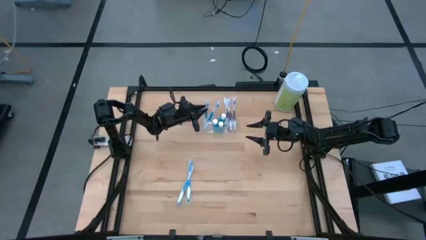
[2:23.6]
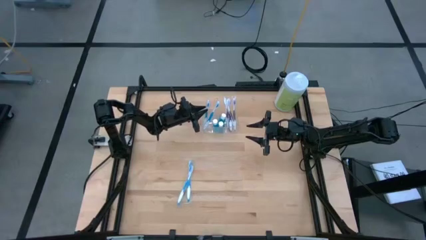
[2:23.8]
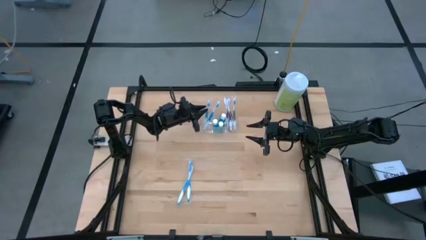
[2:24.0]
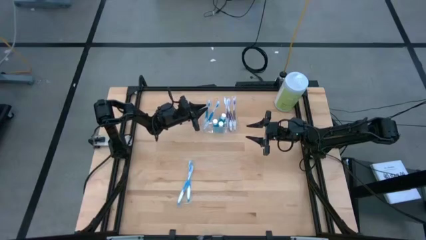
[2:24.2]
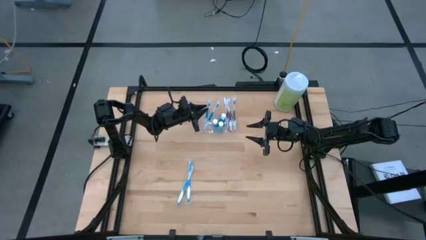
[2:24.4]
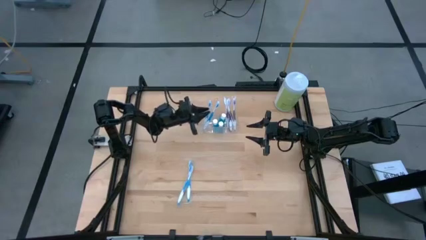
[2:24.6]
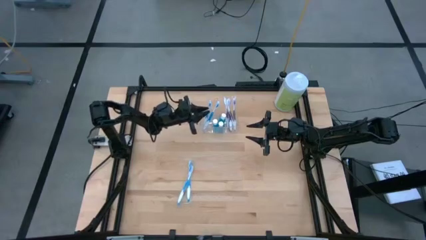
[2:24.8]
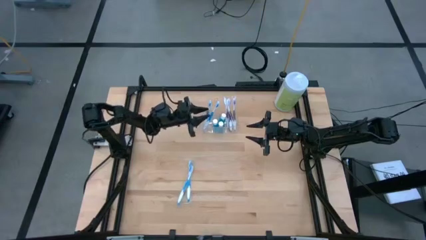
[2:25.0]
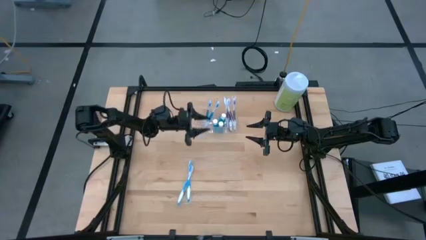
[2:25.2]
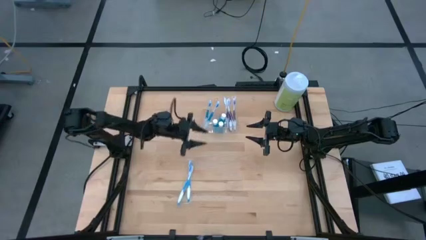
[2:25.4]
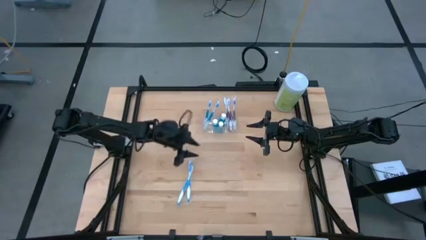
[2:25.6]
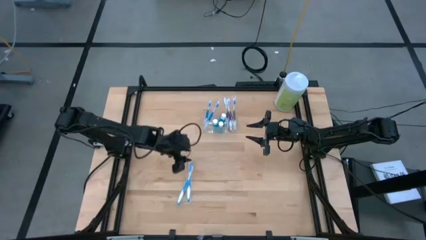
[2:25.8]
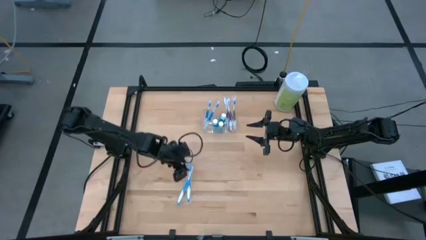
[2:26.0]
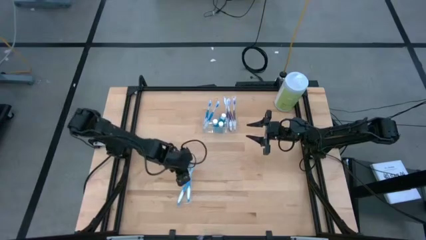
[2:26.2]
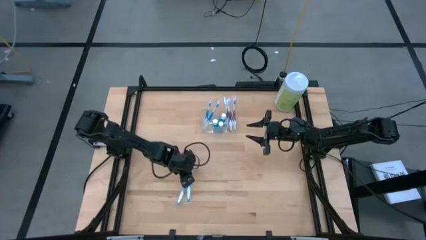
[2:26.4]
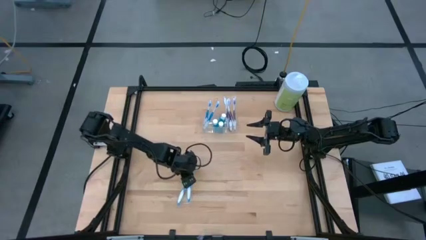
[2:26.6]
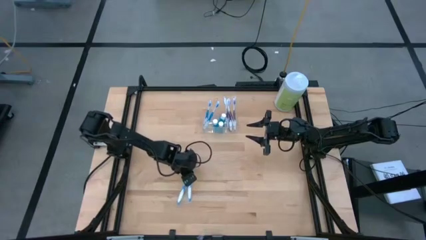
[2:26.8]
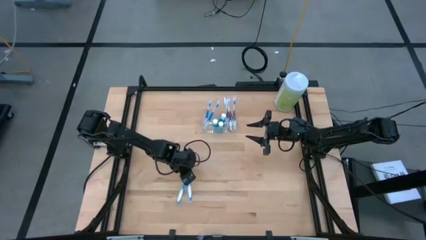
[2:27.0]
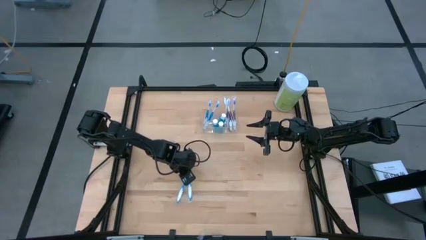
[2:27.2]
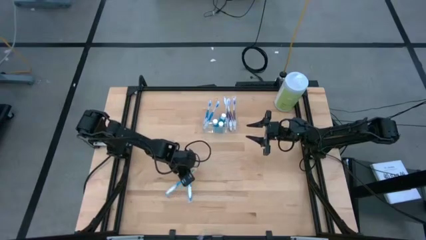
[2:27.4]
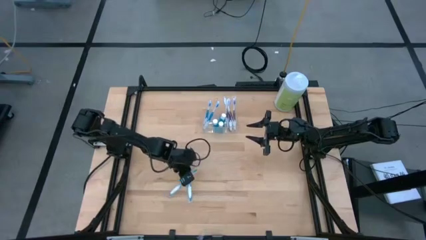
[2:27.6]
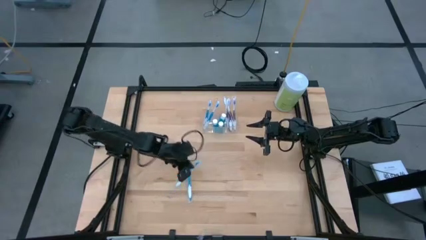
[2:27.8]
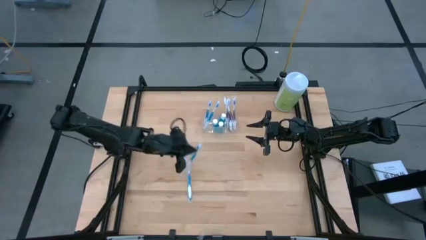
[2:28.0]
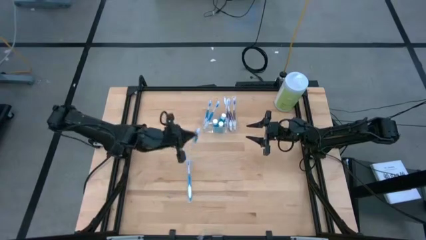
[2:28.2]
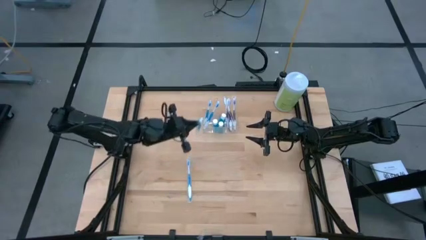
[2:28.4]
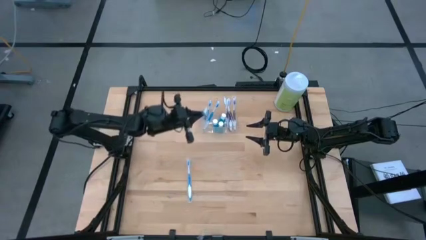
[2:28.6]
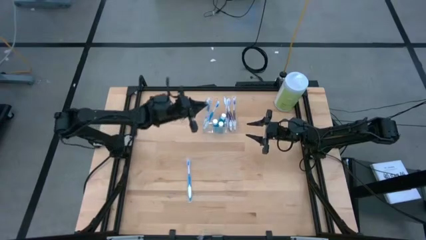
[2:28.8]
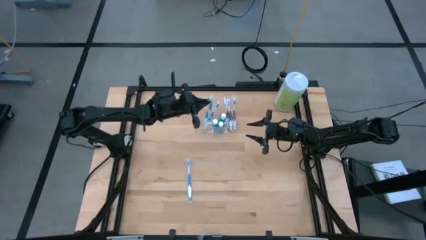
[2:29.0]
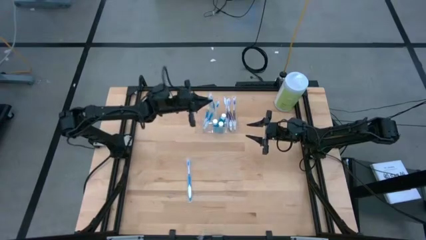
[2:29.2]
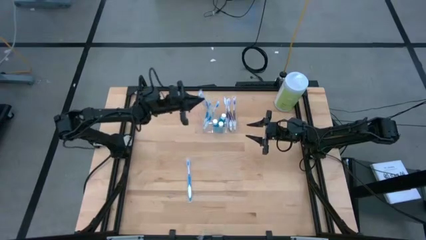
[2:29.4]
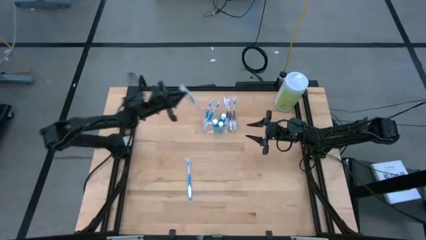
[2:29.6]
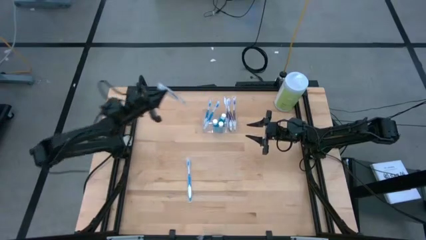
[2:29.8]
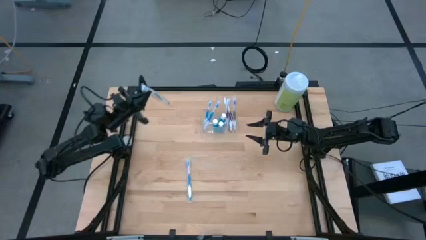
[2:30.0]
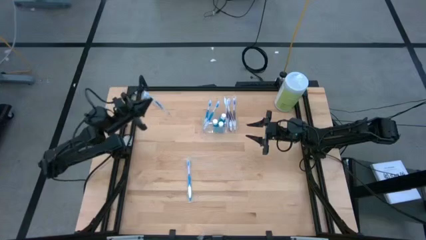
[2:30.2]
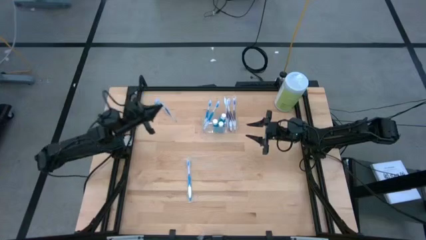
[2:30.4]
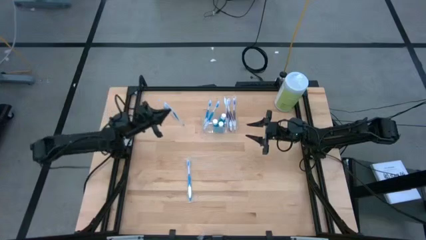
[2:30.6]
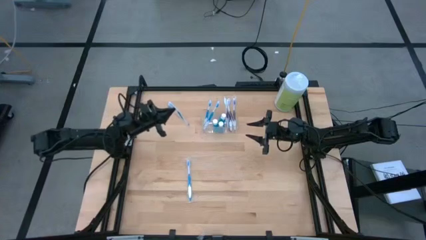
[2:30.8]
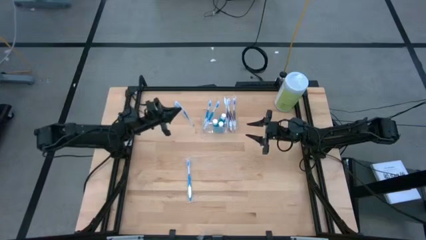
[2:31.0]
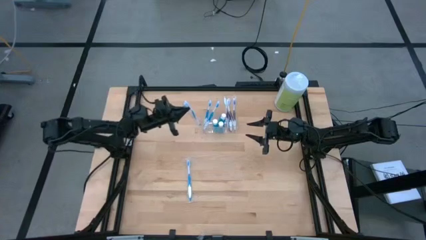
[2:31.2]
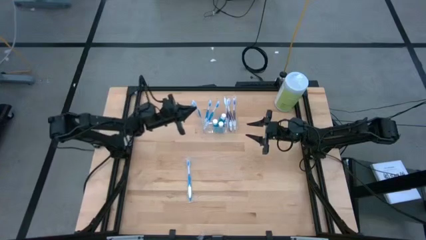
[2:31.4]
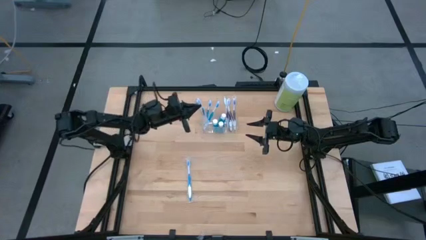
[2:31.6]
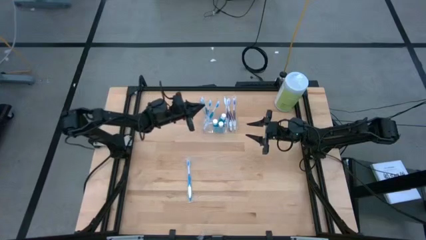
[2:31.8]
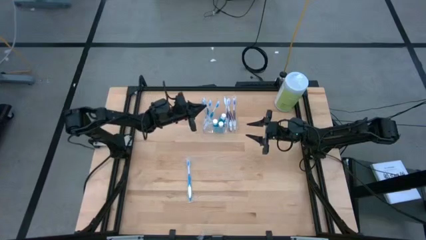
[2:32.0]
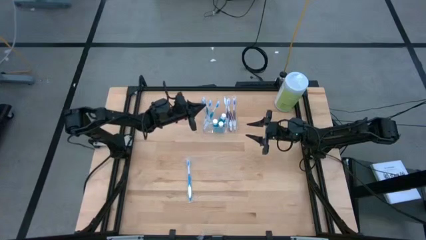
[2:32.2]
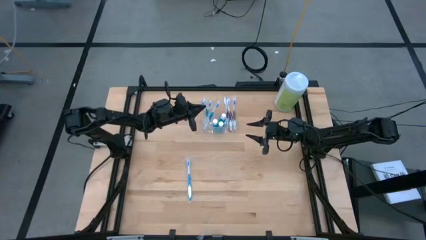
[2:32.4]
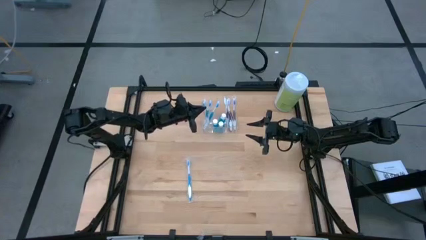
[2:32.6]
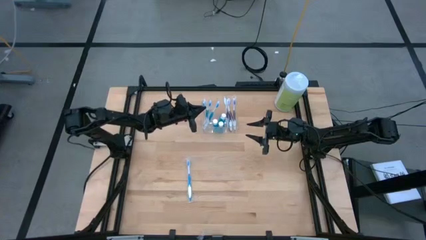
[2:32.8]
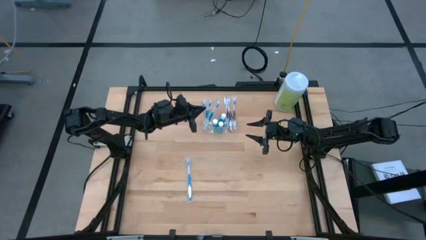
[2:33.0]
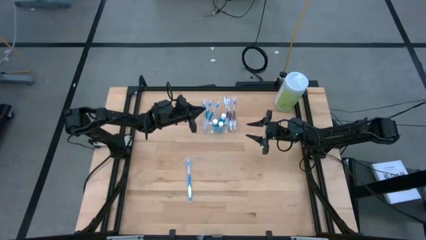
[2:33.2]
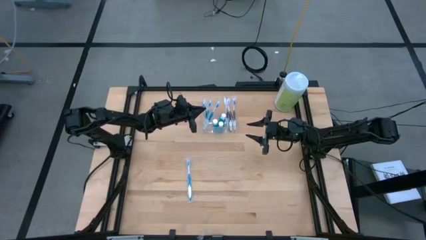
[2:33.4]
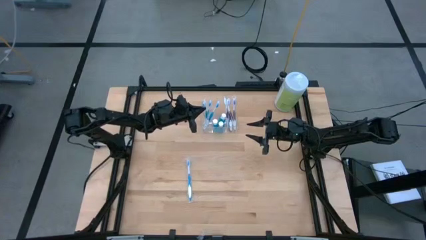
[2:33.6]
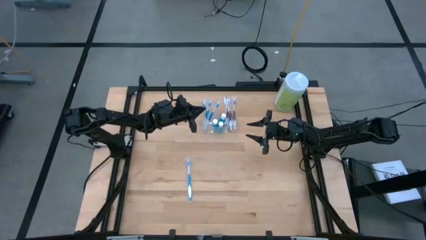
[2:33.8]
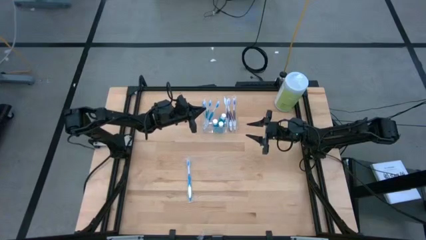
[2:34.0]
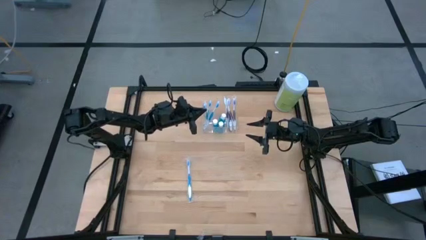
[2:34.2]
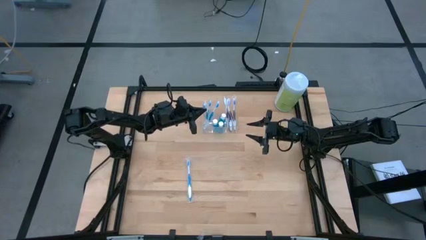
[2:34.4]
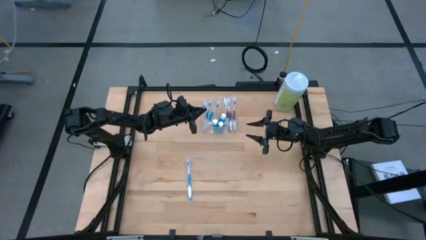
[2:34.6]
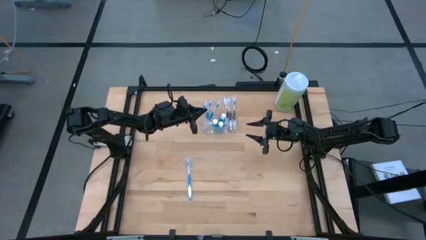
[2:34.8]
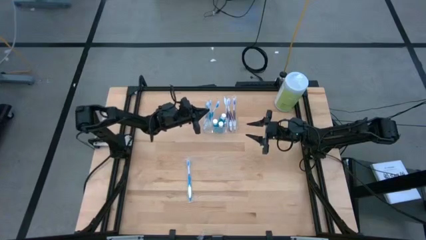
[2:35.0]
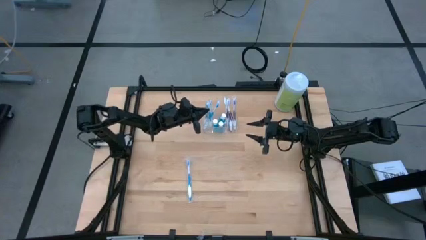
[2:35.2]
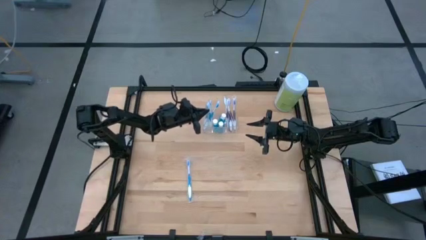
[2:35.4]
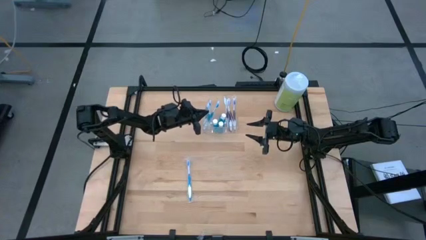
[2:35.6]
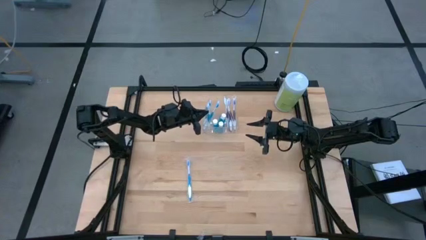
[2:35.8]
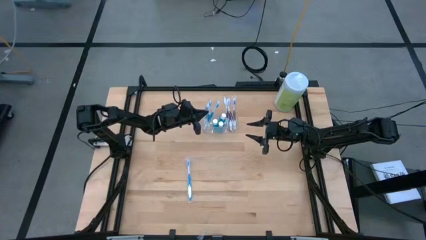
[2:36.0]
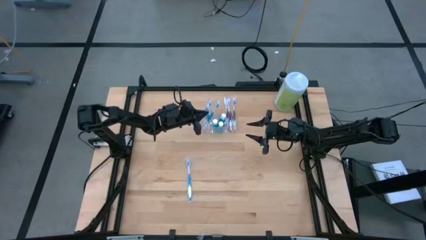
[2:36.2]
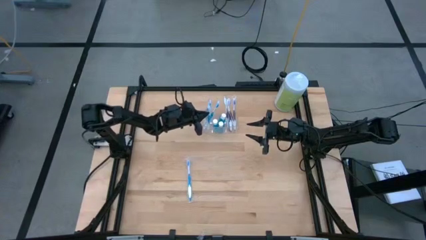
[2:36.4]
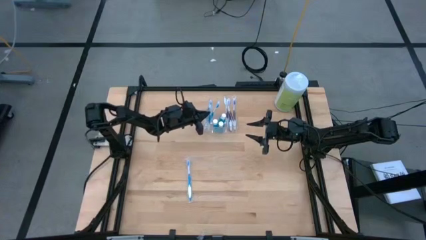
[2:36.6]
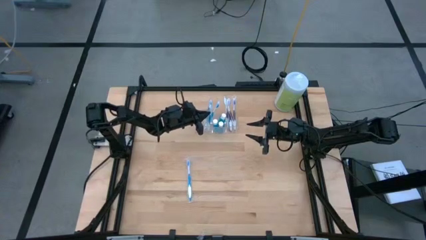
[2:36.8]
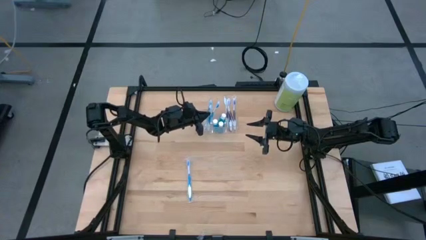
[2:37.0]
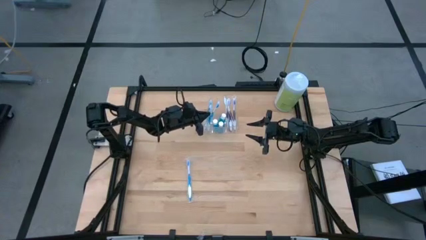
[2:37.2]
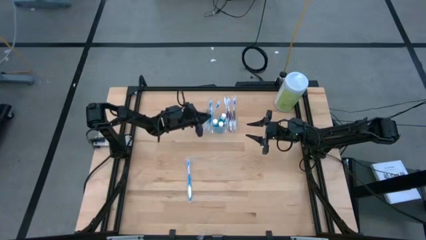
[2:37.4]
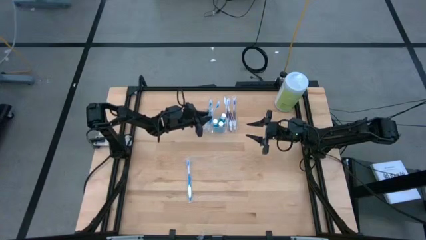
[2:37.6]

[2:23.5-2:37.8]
Task: Pick & Place toothbrushing station
Put the blue toothbrush into the transparent organizer

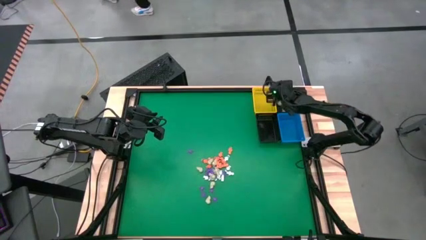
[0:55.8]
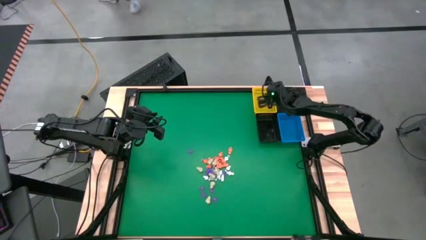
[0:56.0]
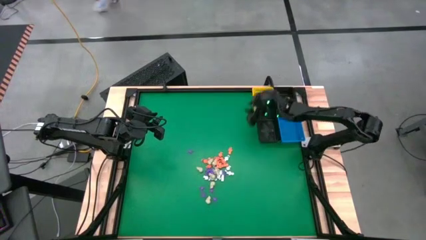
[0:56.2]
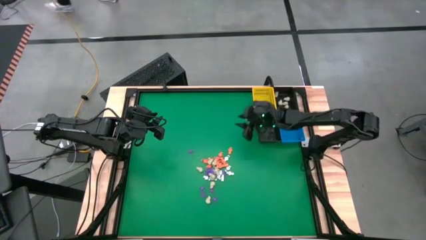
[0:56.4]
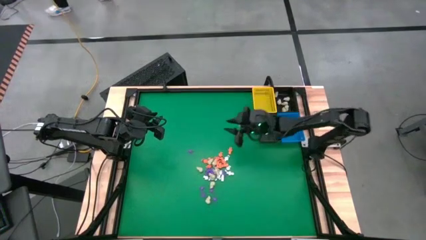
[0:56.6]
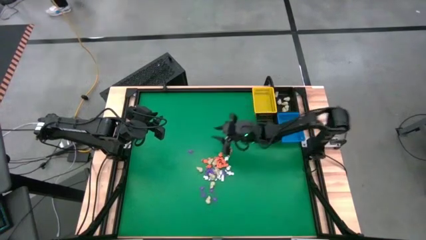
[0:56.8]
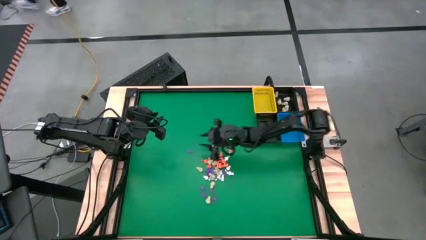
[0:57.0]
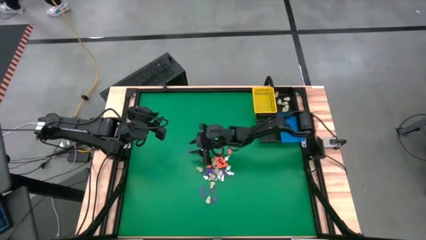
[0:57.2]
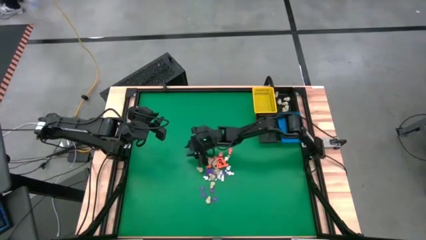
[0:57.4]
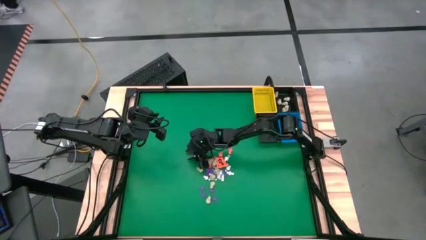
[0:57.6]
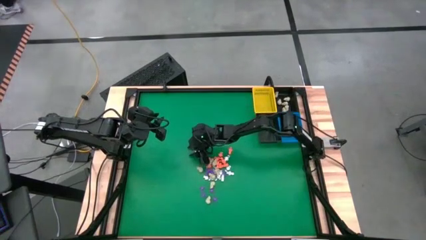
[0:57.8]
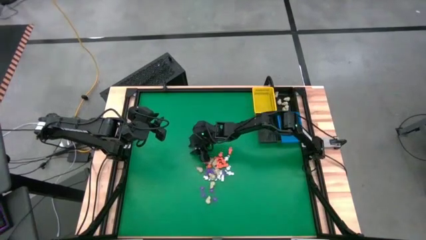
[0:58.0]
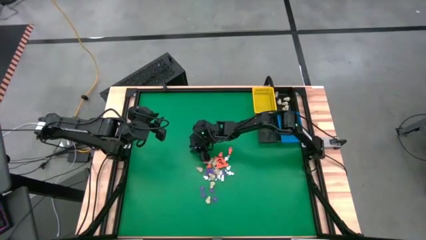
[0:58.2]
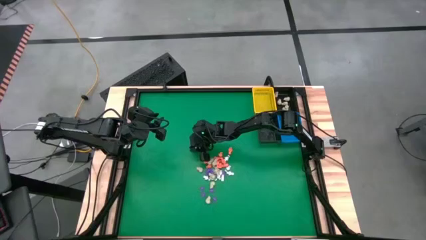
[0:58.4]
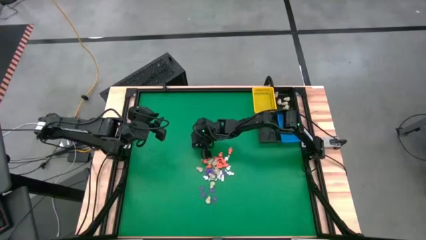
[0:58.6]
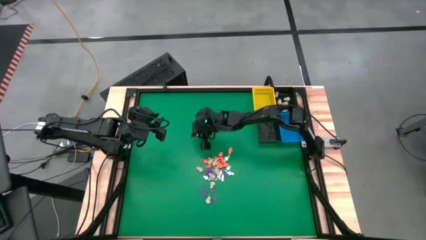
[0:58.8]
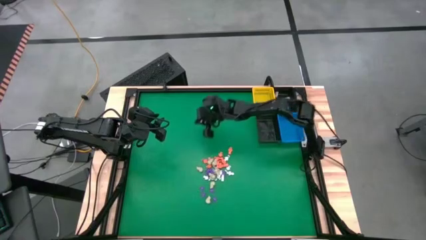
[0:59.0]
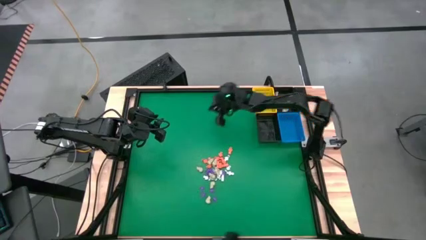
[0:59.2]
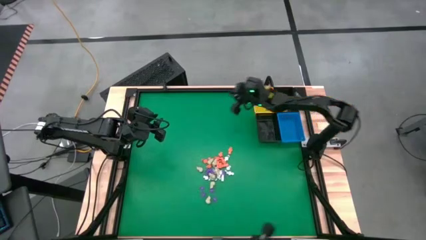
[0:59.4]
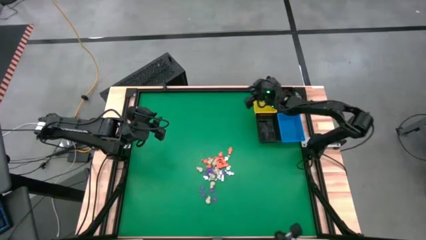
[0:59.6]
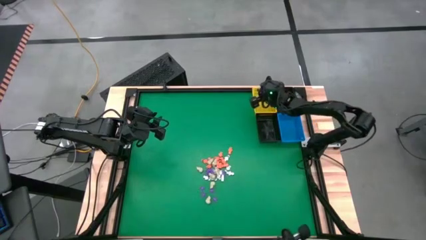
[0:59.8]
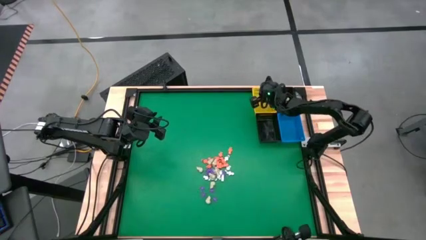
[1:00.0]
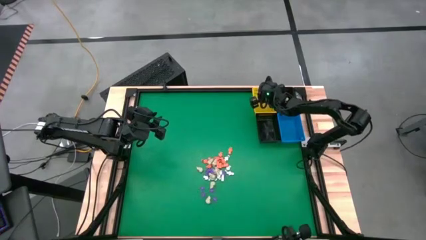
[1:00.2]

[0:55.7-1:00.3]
Task: Sort Halloween decoration
Put the purple spider toy into the yellow basket
